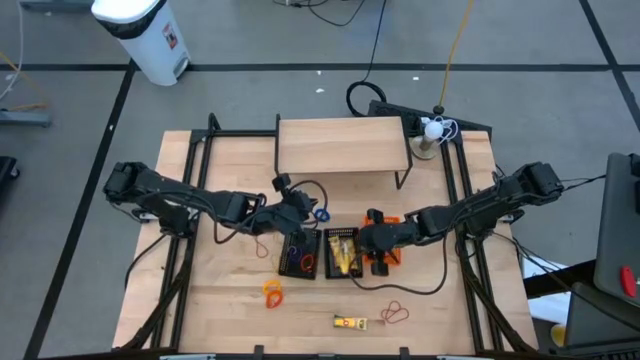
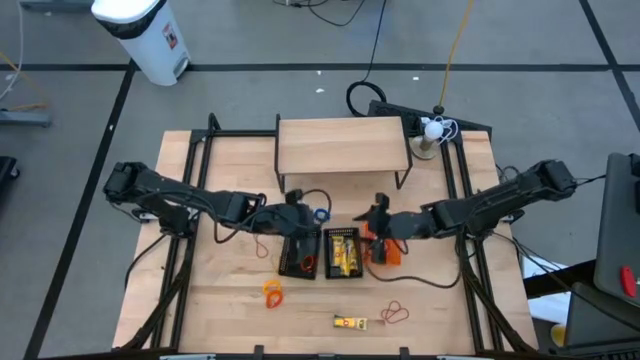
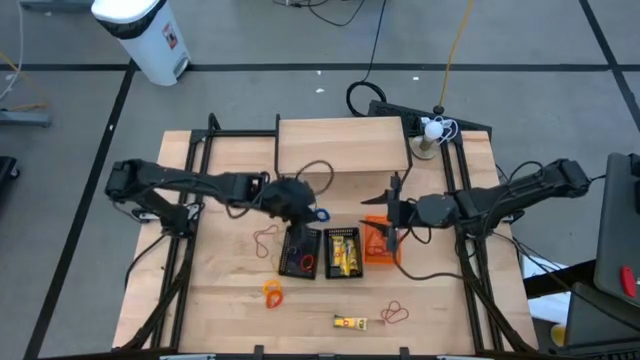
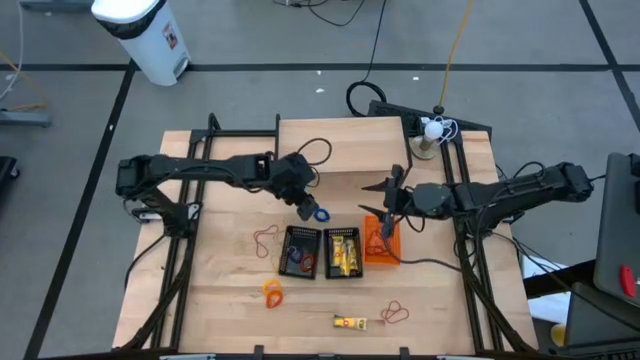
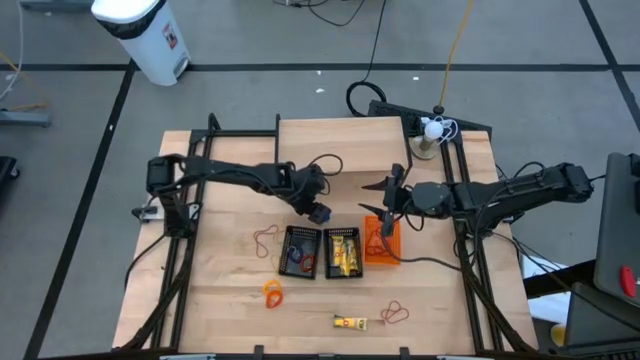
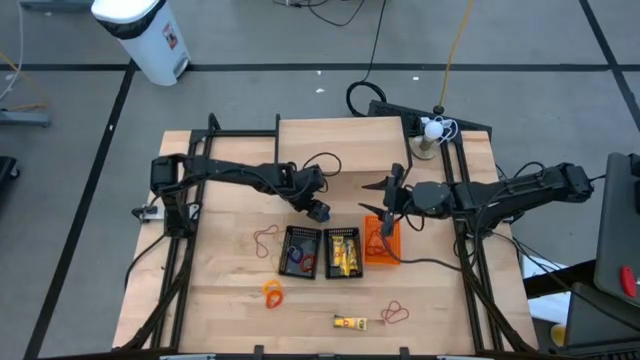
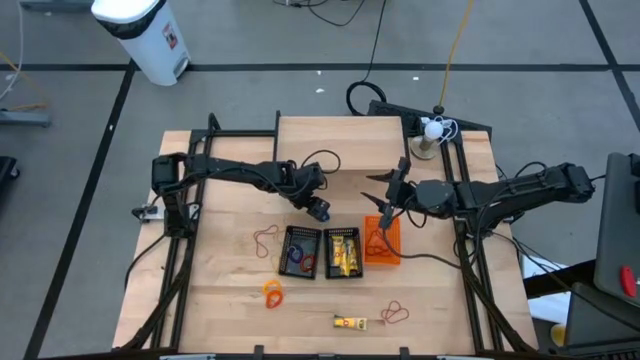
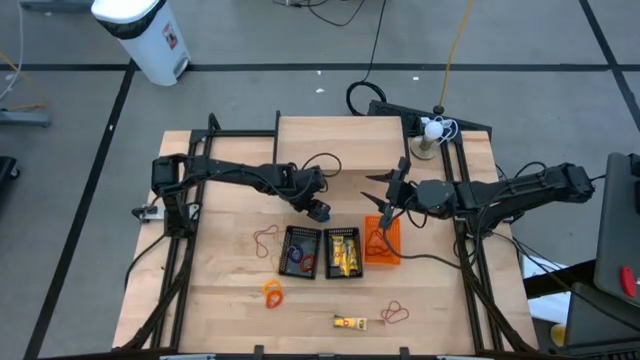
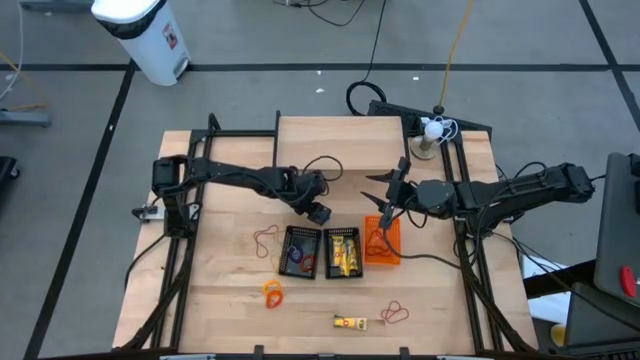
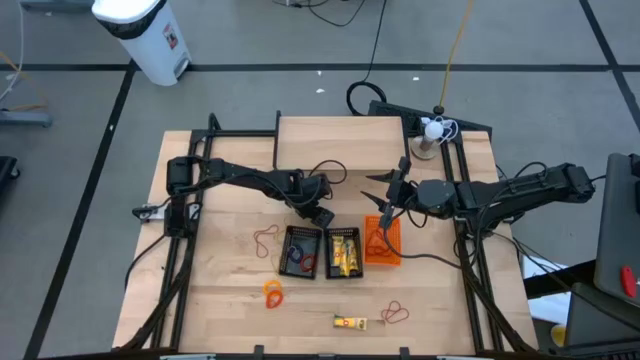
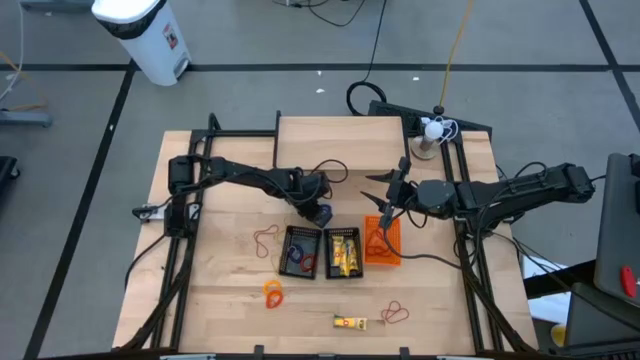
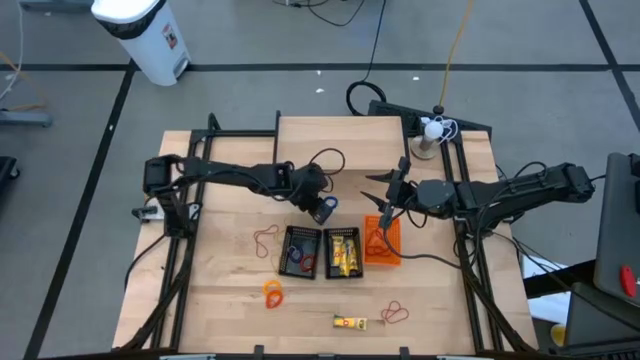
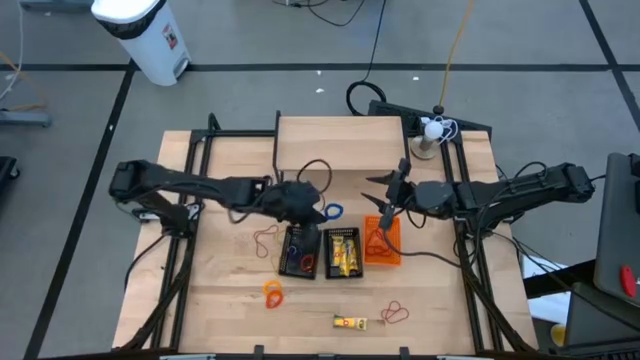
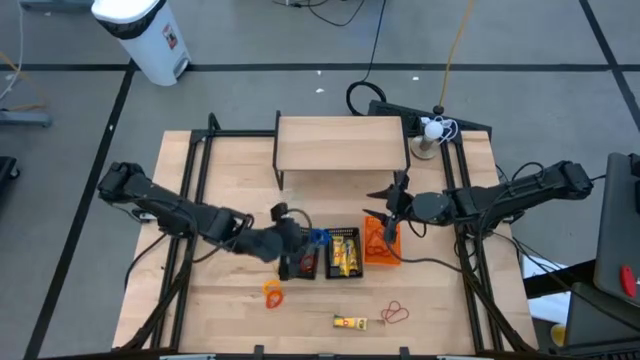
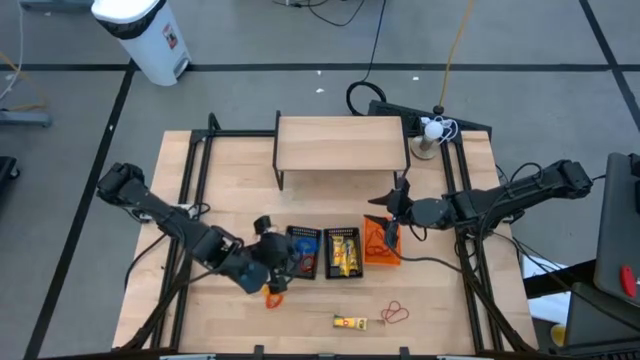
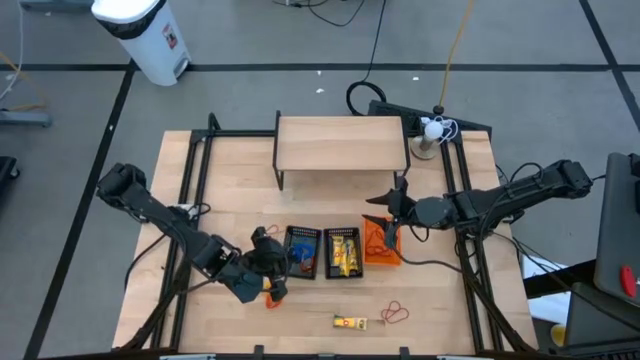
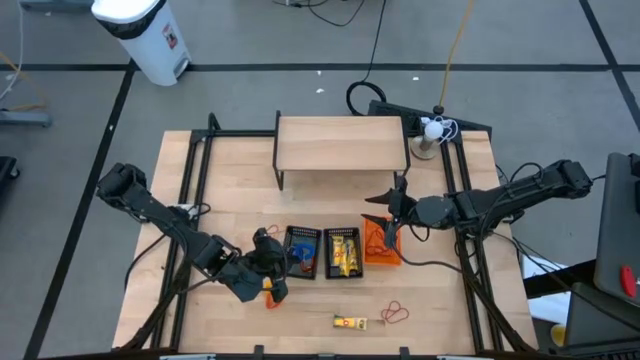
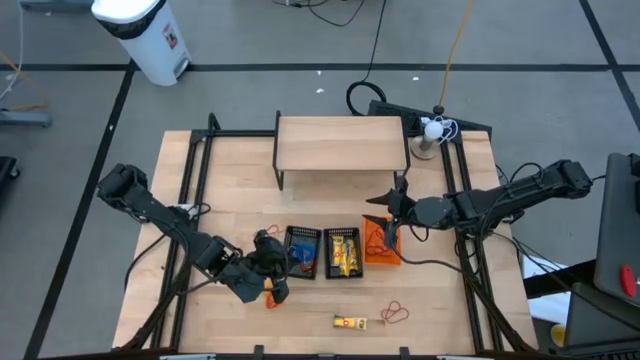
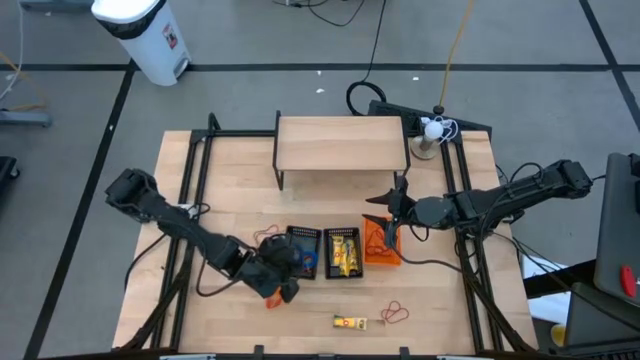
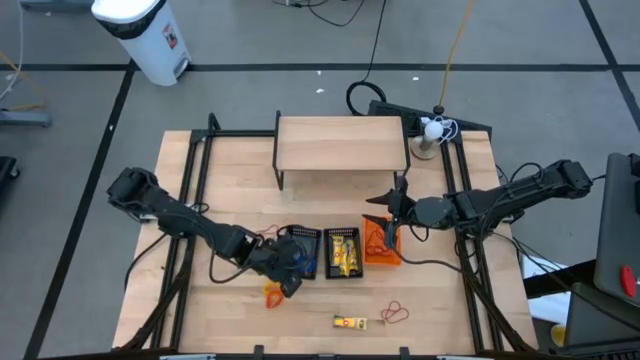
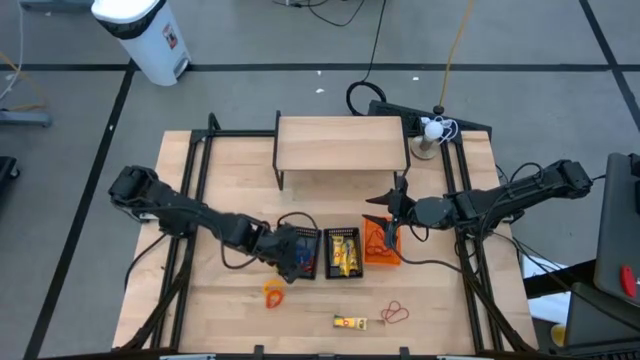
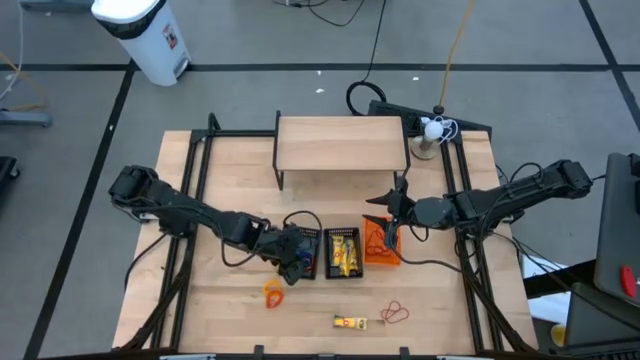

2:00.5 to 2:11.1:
Task: Pick & Place Office Desk Supplies
Put the blue spring rubber band into the left black basket

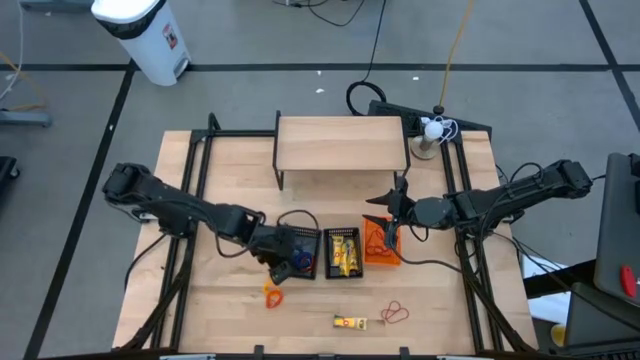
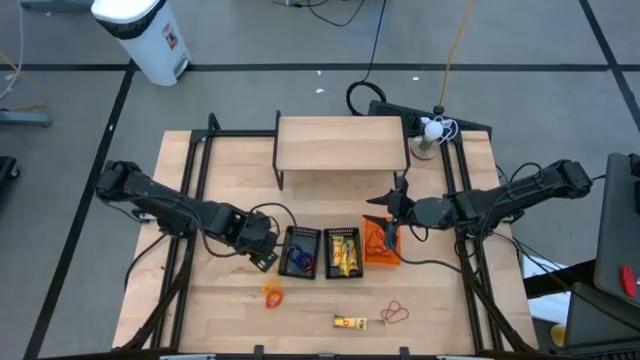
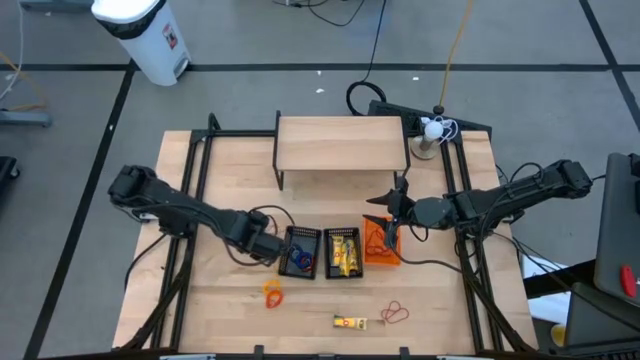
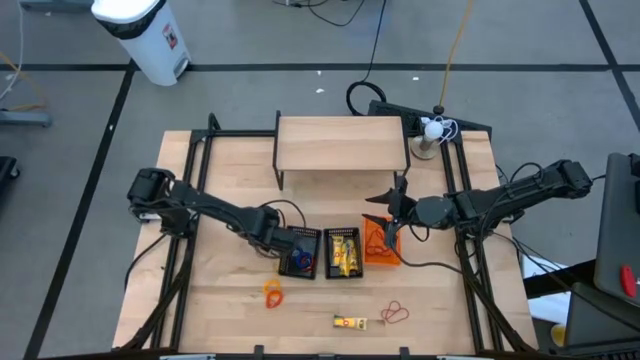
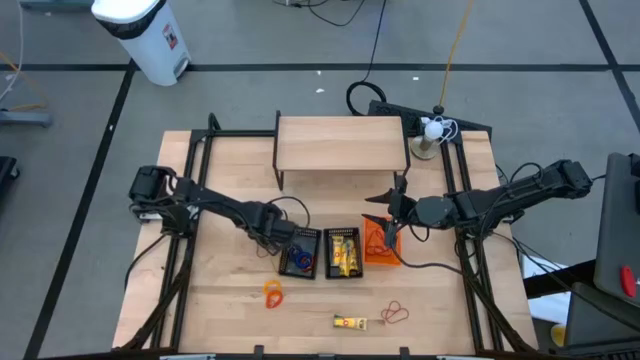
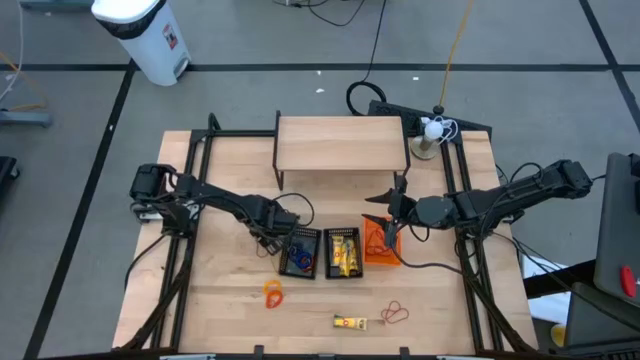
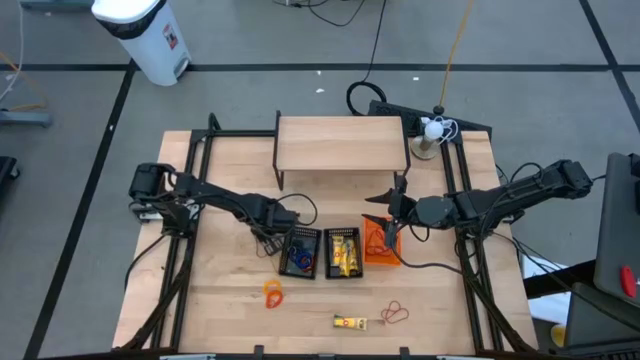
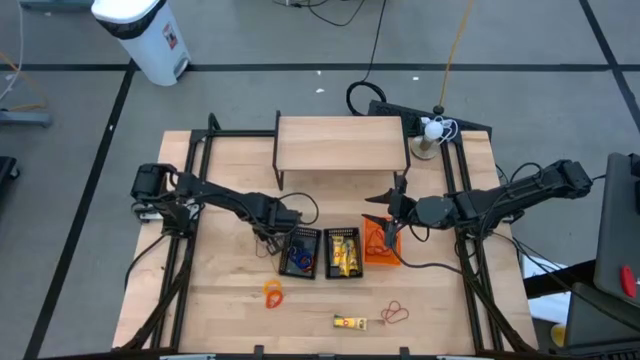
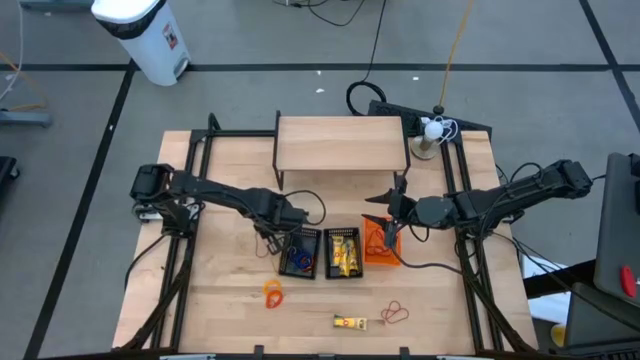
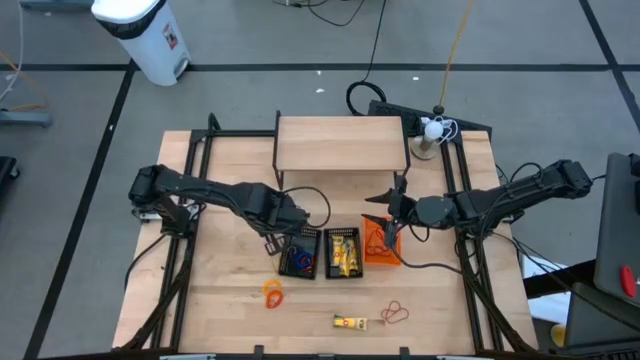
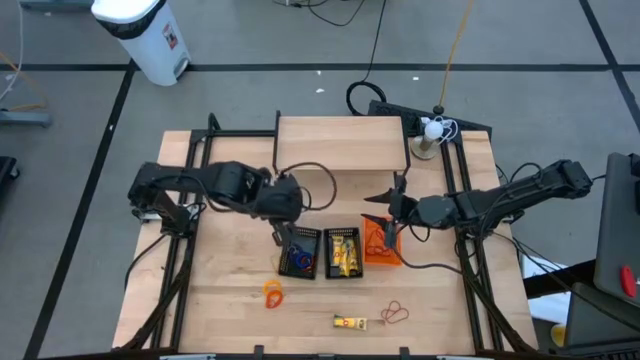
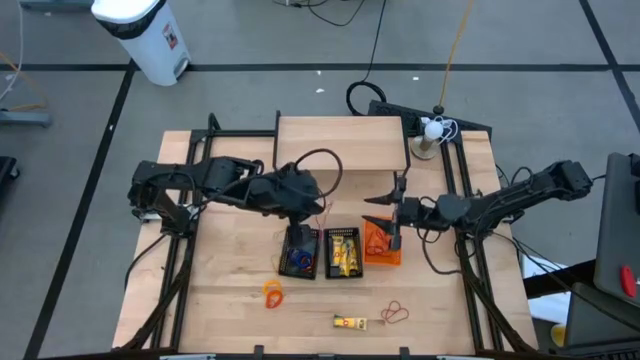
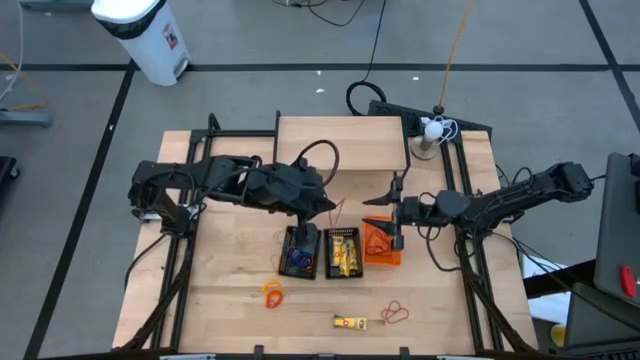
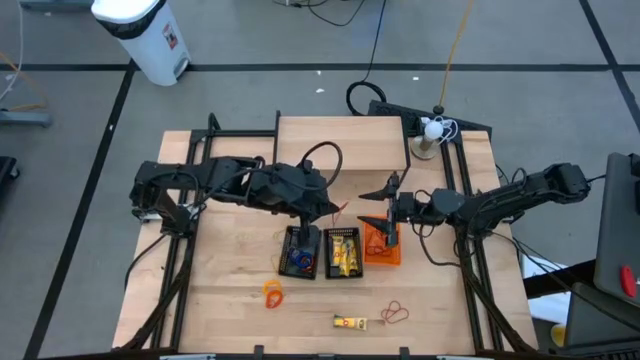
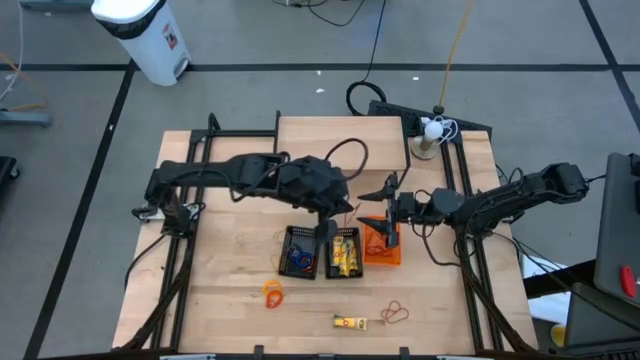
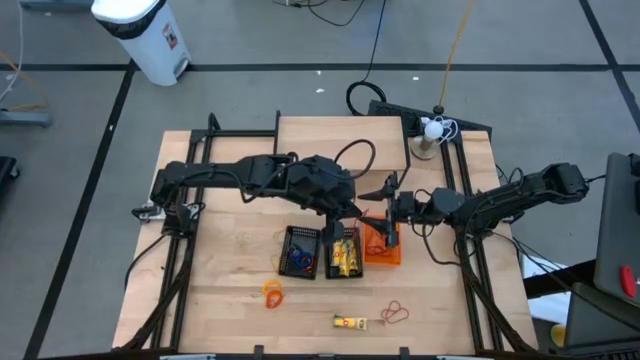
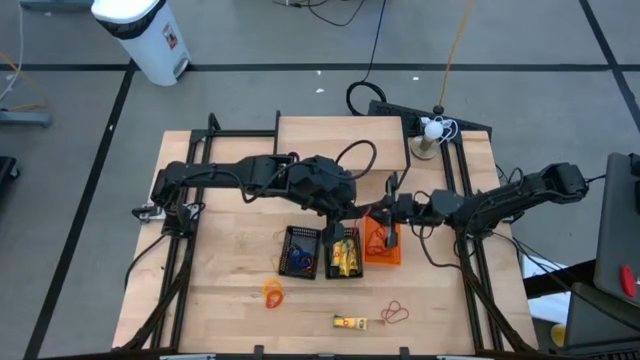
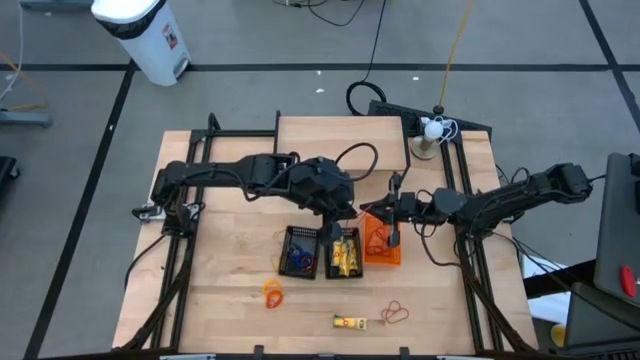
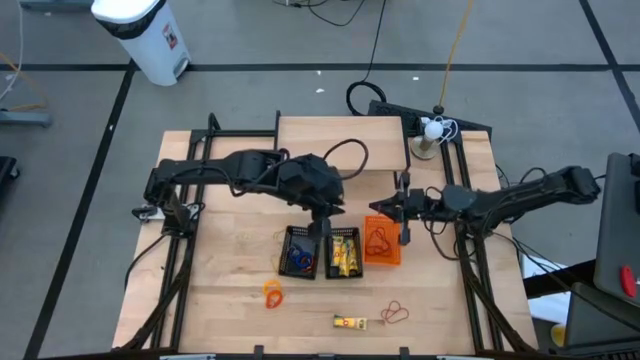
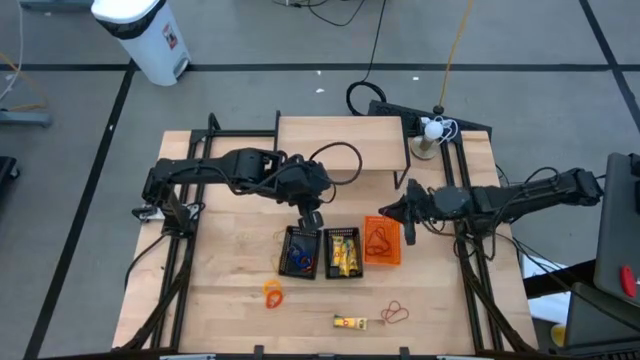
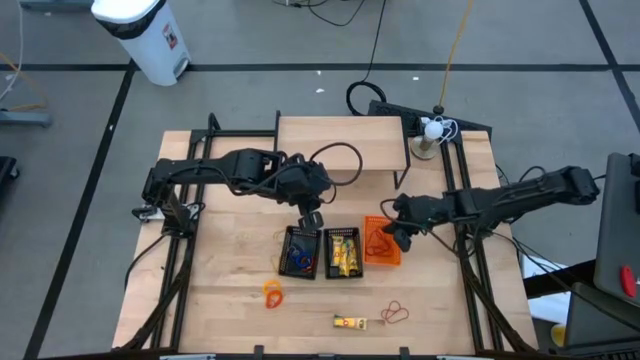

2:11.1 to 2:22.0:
Put the rubber band into the orange basket
